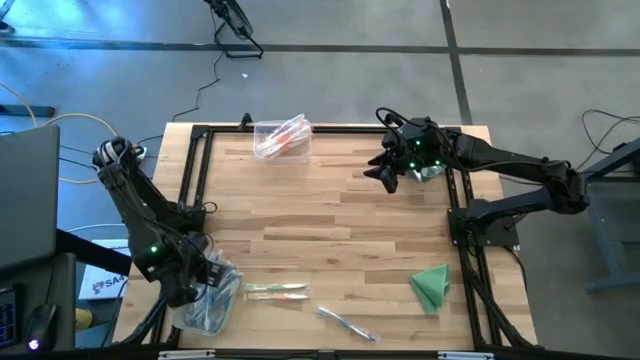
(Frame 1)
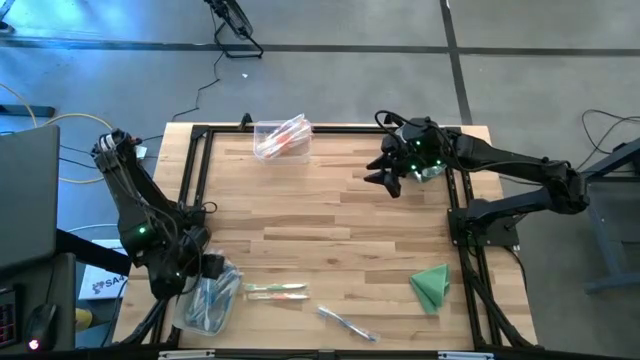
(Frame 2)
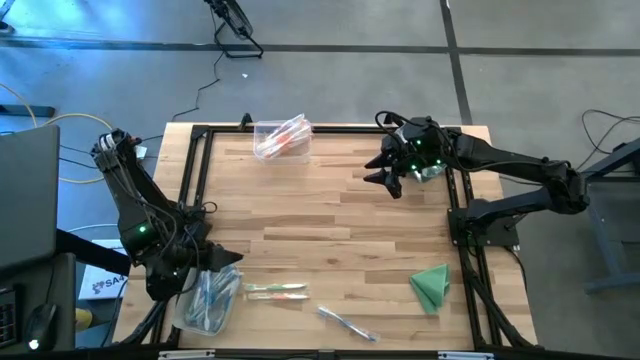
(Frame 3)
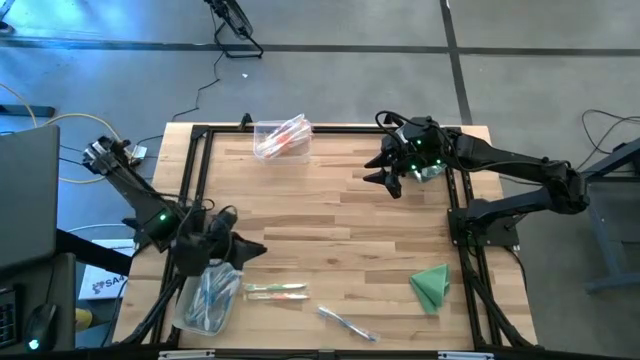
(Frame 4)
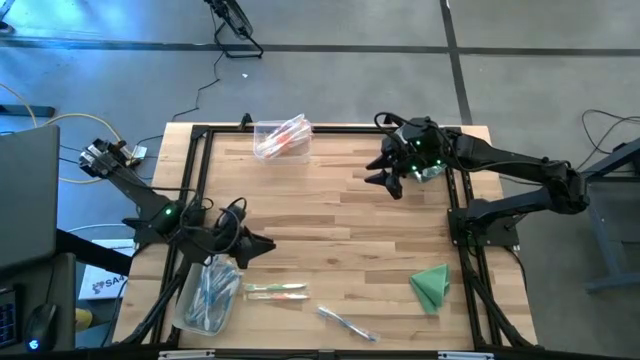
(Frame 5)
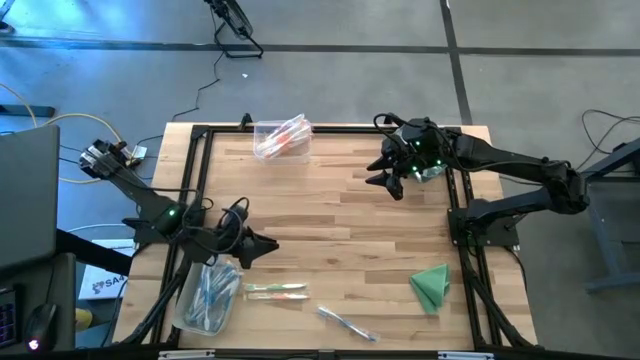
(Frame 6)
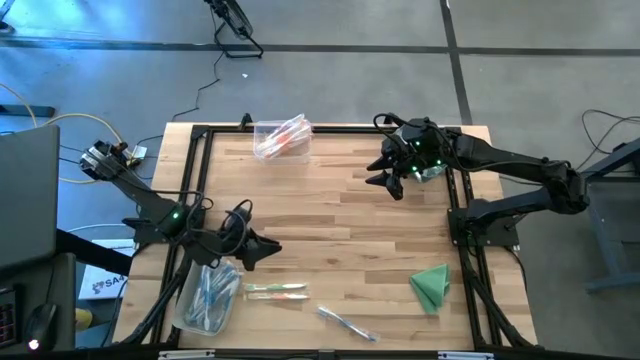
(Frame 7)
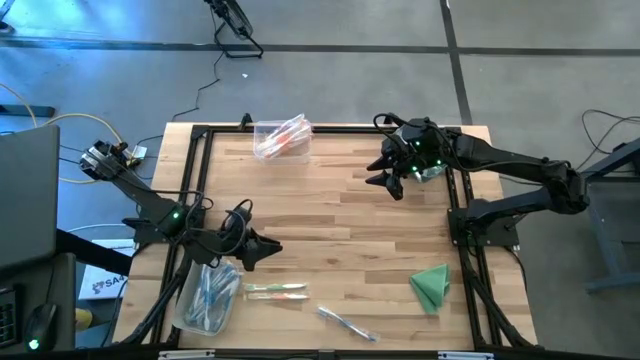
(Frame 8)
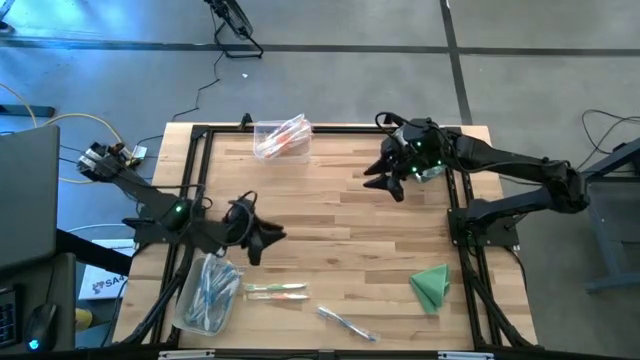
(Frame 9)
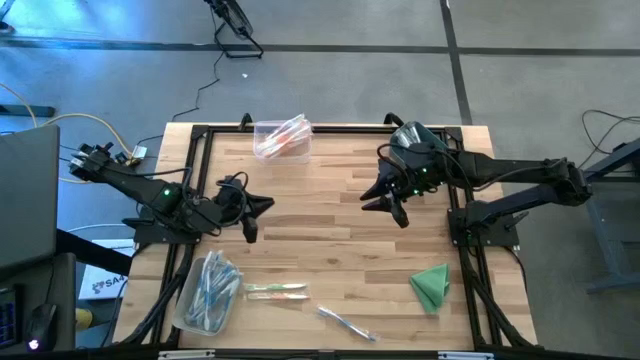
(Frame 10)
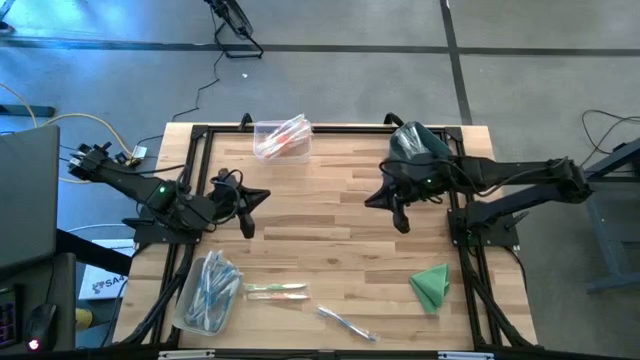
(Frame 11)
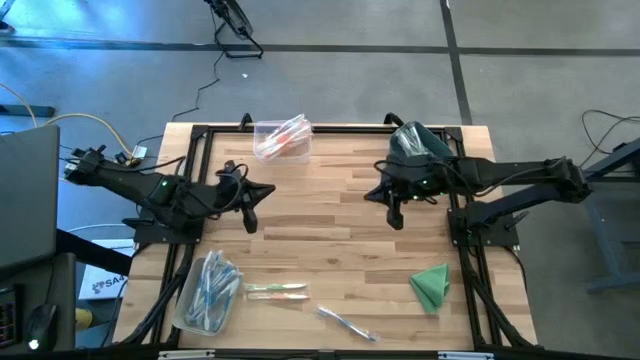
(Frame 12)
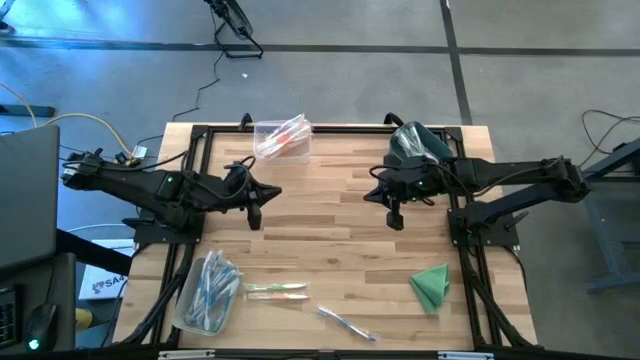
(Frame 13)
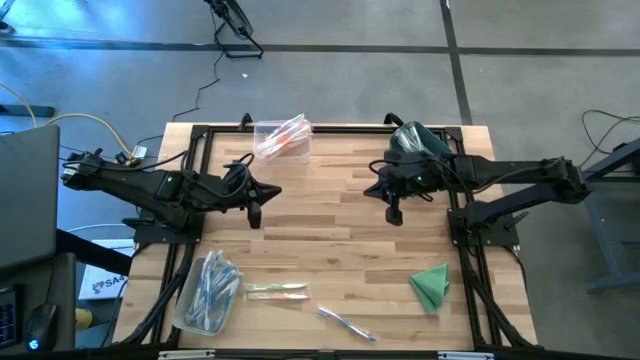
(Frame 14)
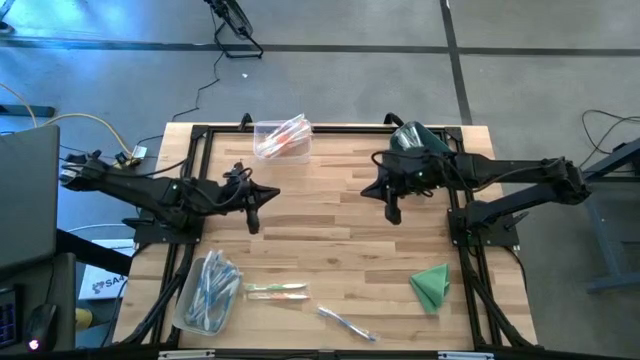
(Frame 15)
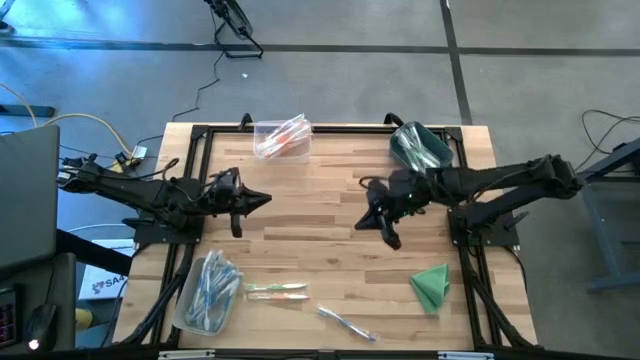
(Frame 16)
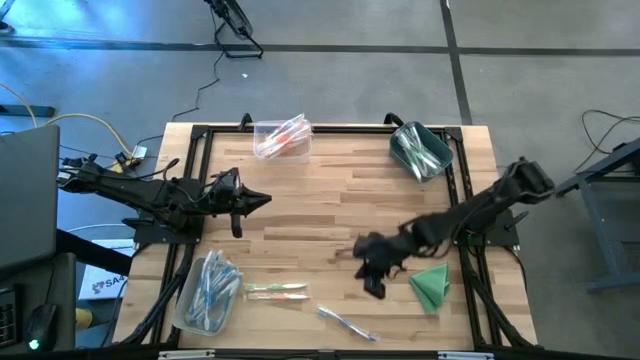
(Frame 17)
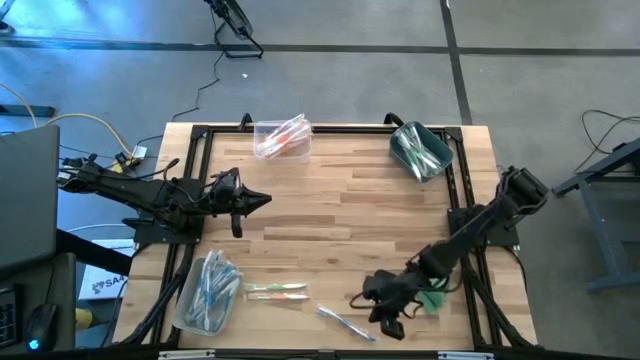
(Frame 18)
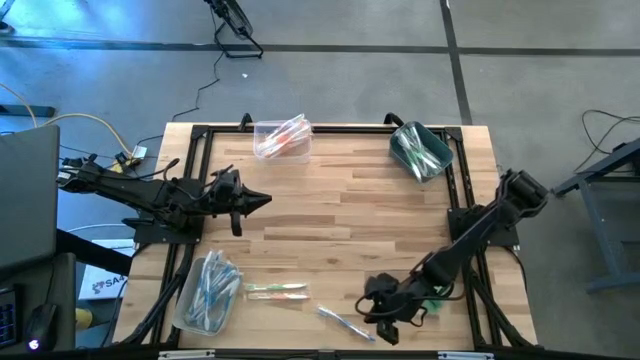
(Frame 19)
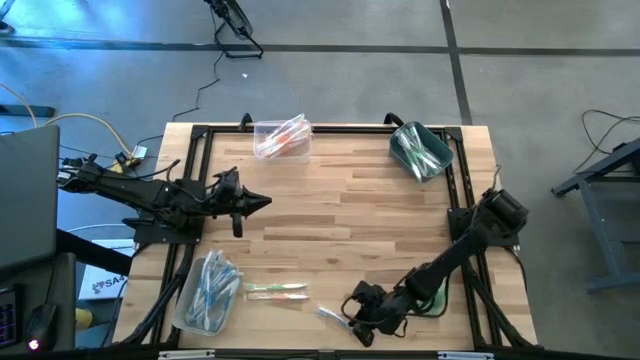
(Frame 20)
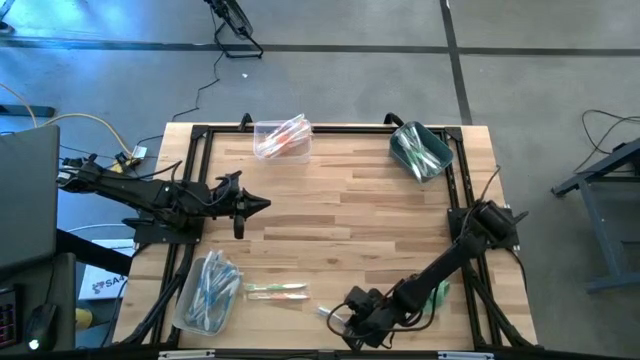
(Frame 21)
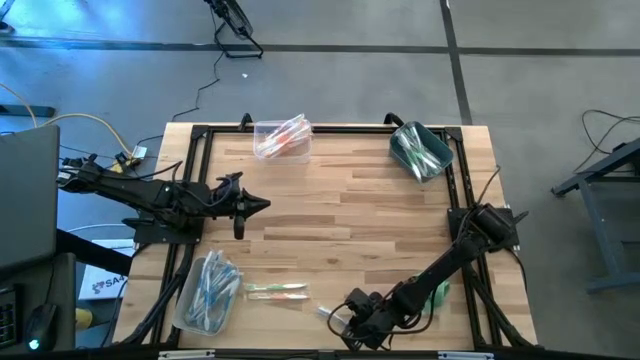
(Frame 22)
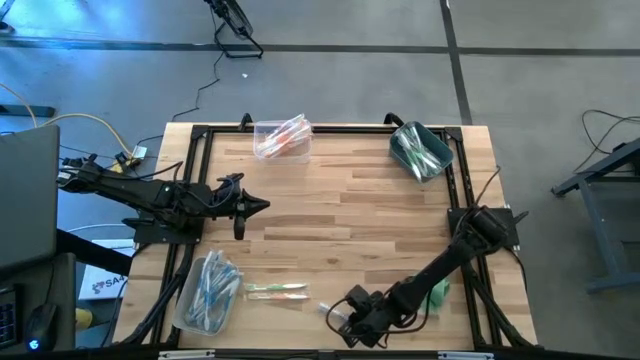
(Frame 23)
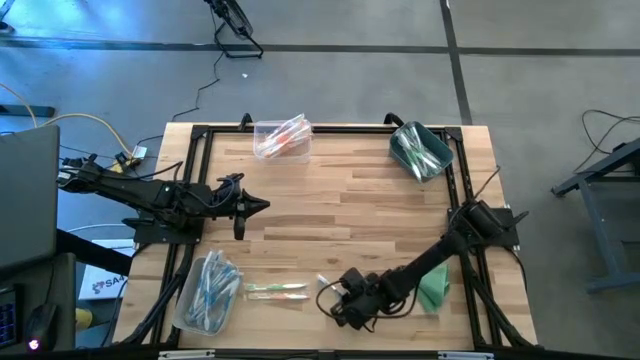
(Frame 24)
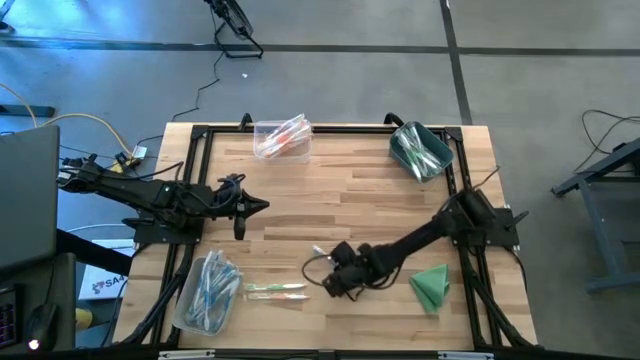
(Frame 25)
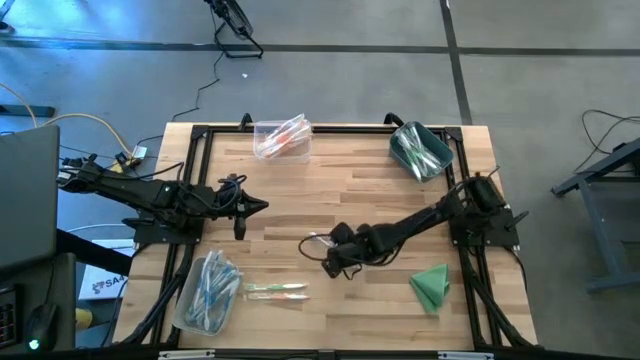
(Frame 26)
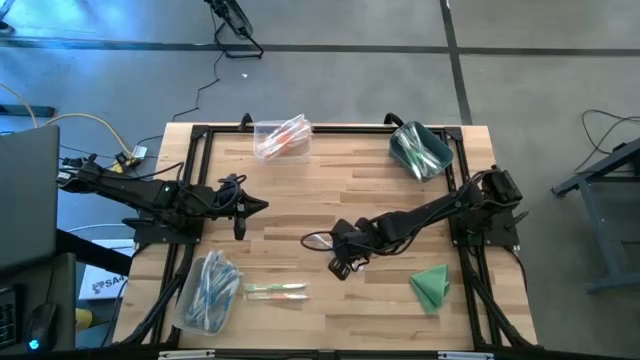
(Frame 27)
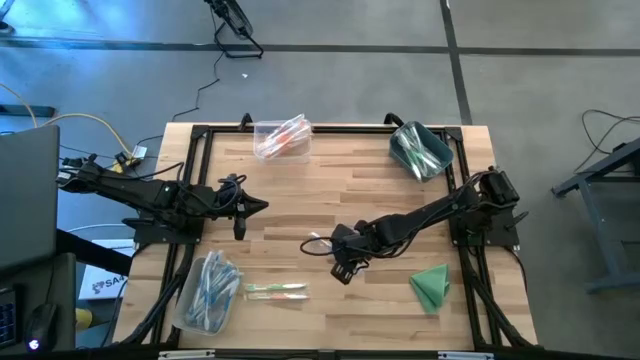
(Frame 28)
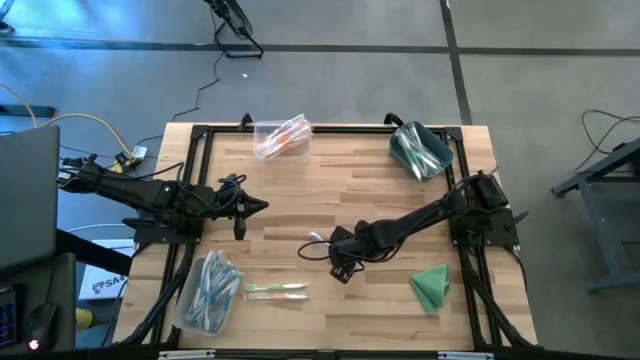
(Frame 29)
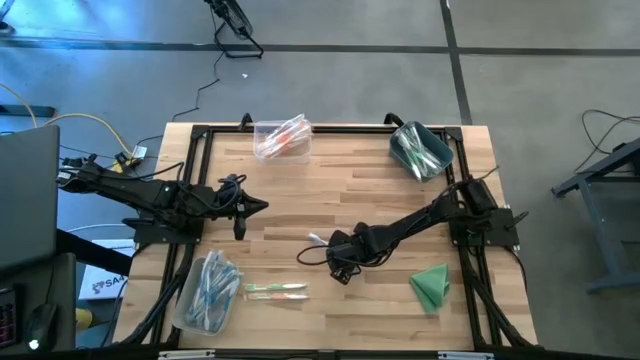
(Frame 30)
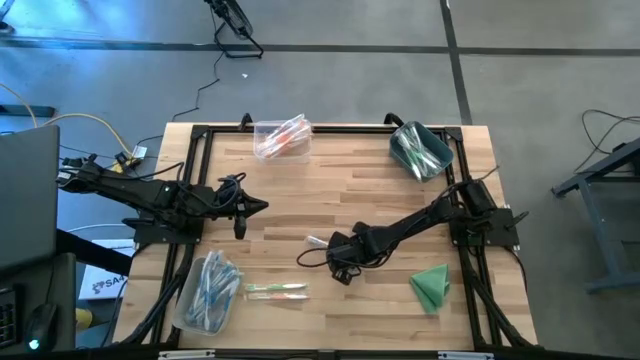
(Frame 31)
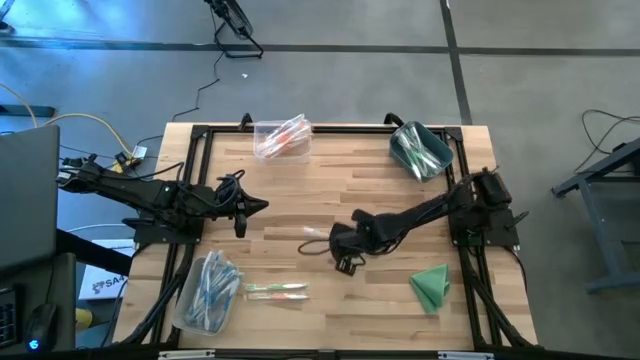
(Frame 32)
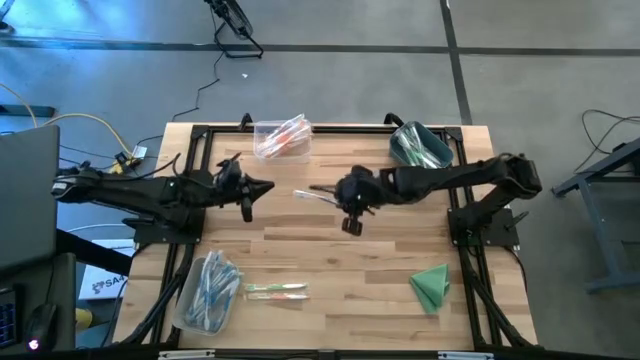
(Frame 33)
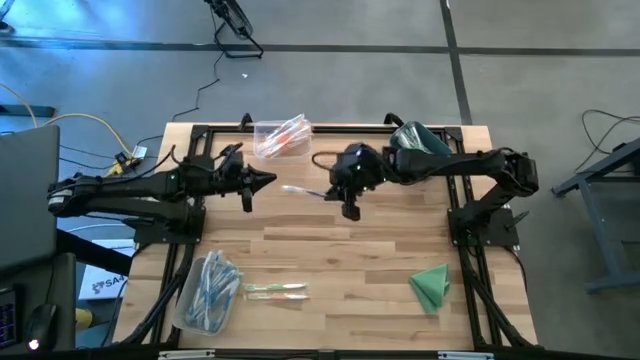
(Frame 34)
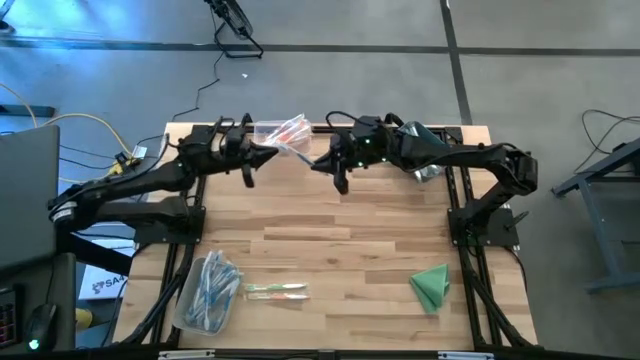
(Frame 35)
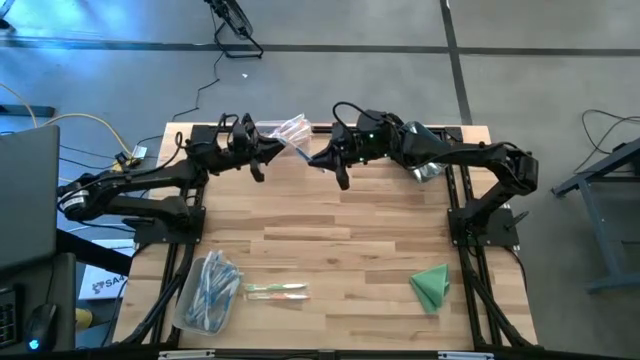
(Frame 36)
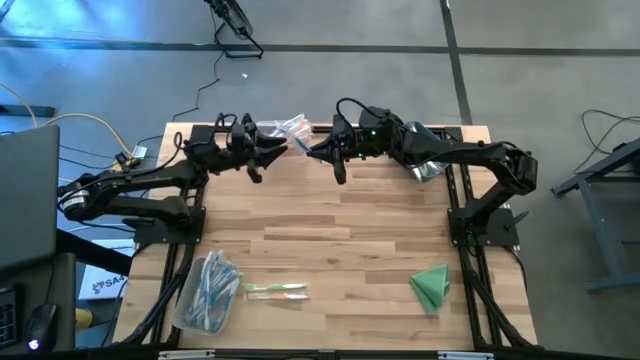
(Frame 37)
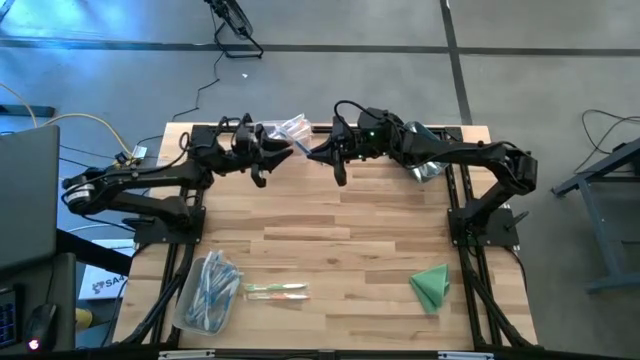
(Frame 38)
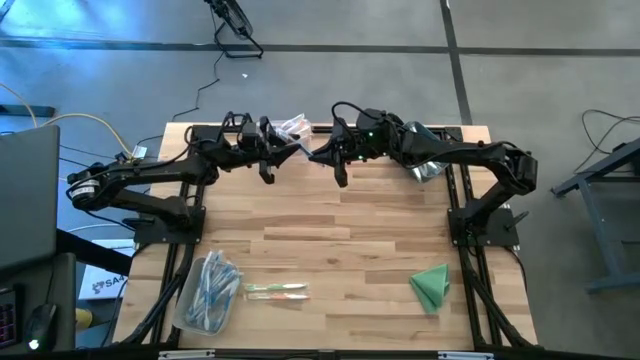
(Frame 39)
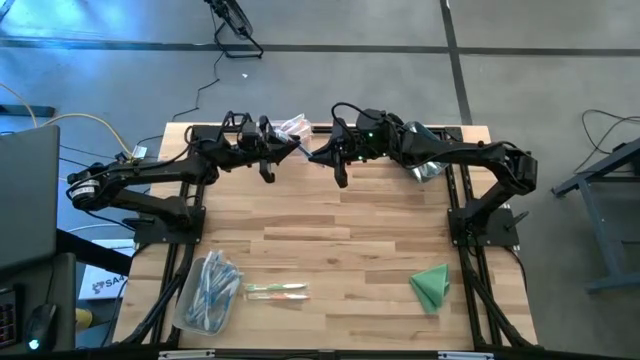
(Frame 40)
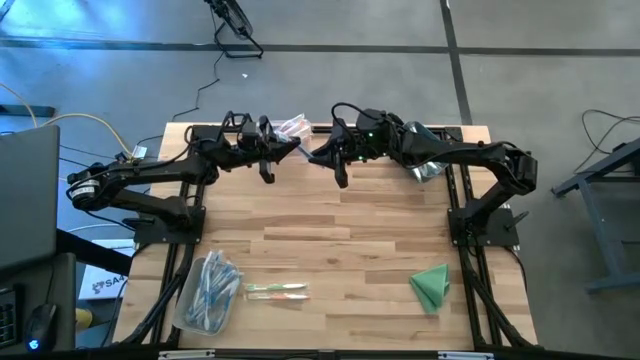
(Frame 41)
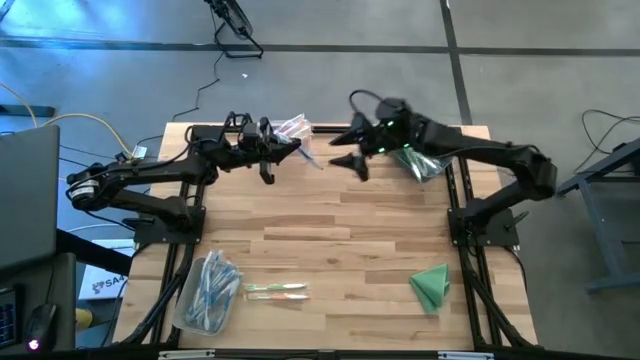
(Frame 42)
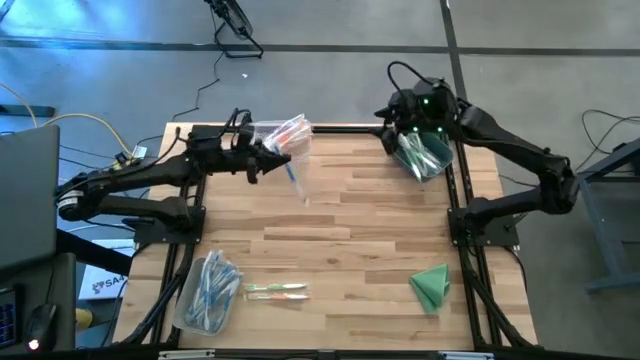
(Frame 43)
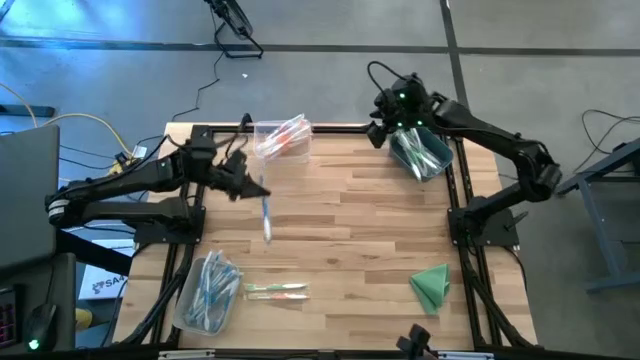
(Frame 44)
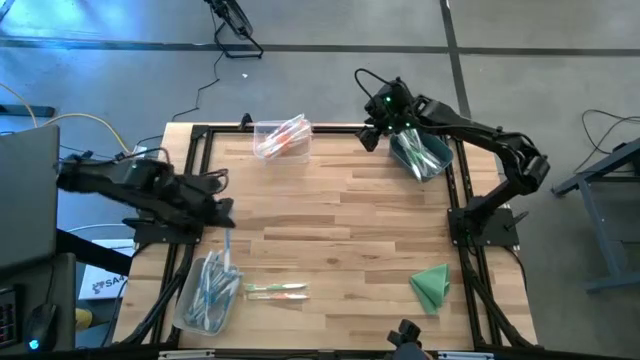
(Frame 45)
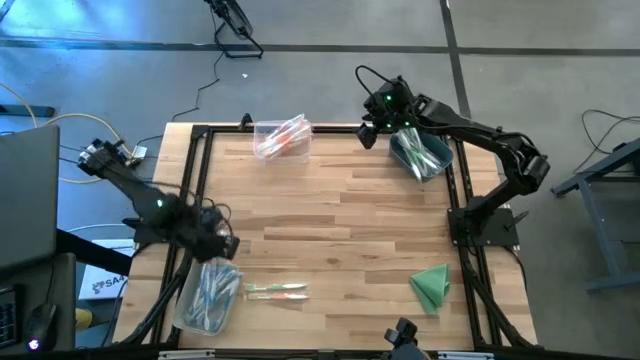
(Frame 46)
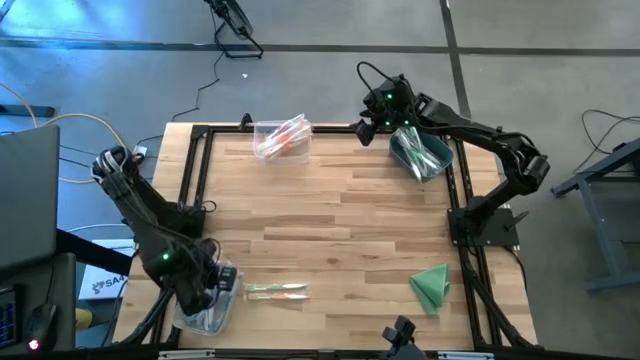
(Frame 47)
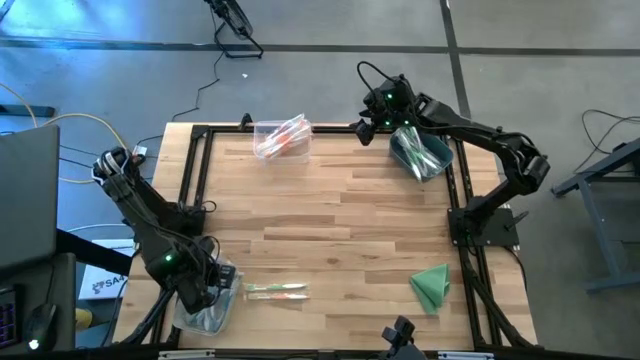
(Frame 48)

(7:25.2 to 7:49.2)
Task: Pick & Place Toothbrushes
Put the blue toothbrush into the gray bin
